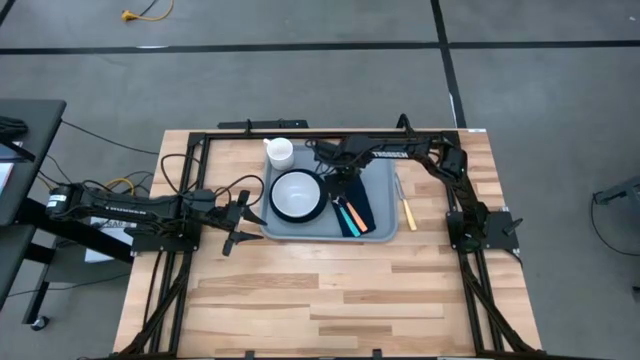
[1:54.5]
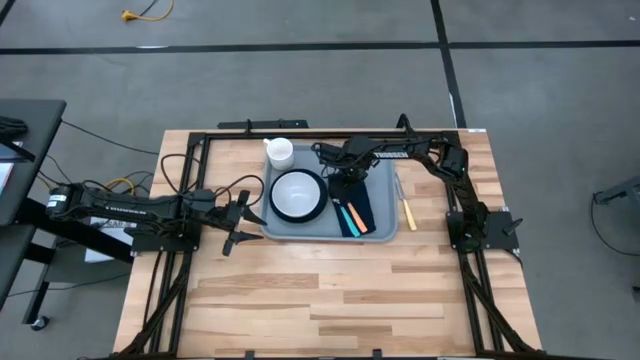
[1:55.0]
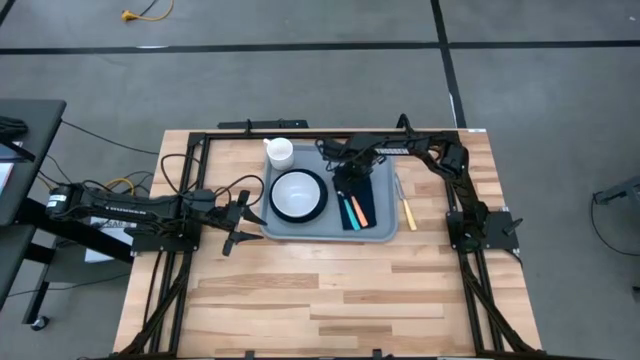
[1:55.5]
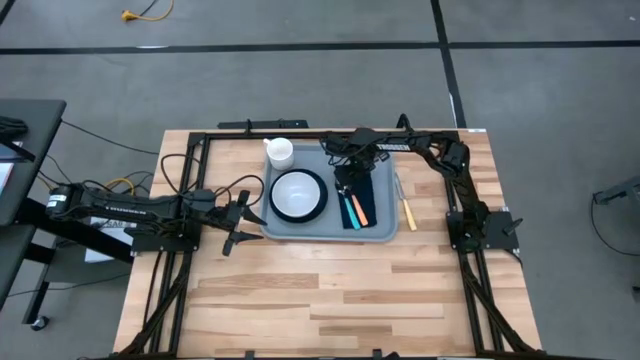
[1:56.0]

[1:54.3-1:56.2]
Task: Set up tray
Adjust the blue napkin on the gray tray

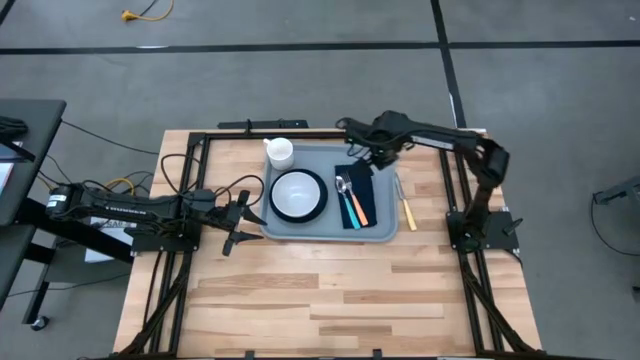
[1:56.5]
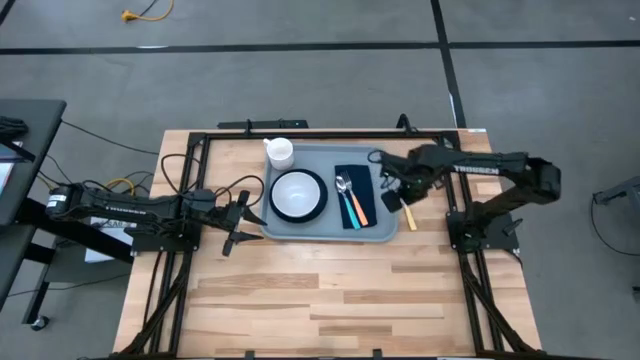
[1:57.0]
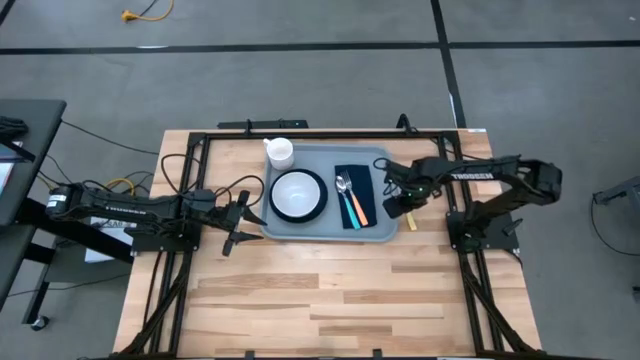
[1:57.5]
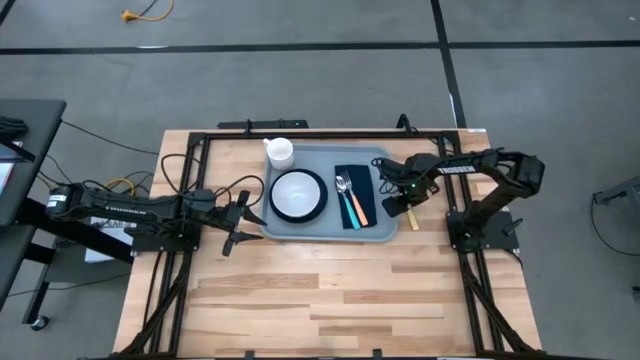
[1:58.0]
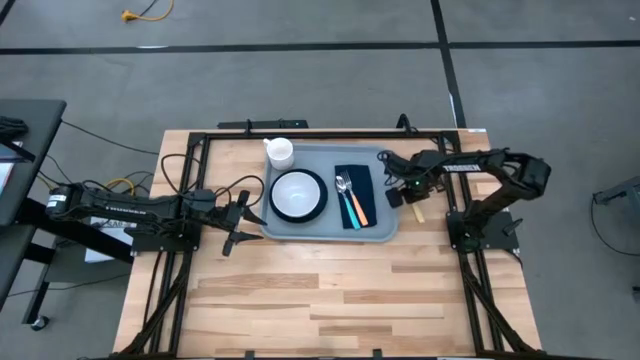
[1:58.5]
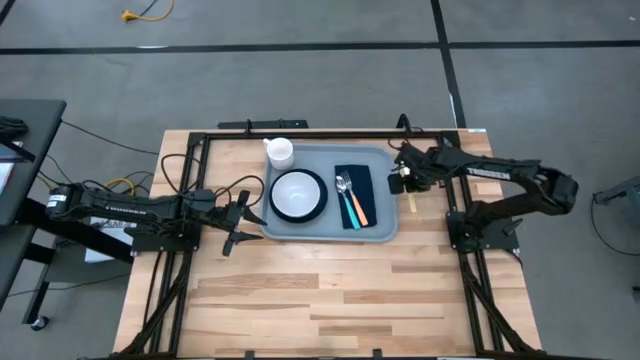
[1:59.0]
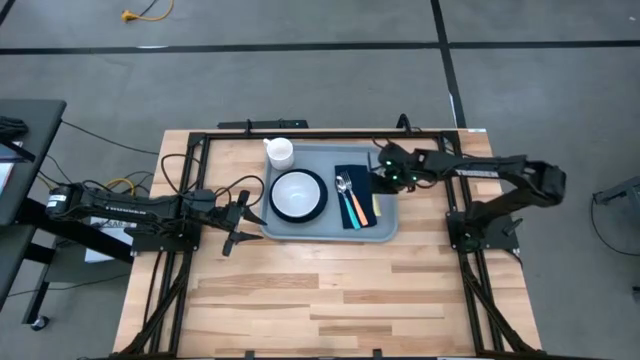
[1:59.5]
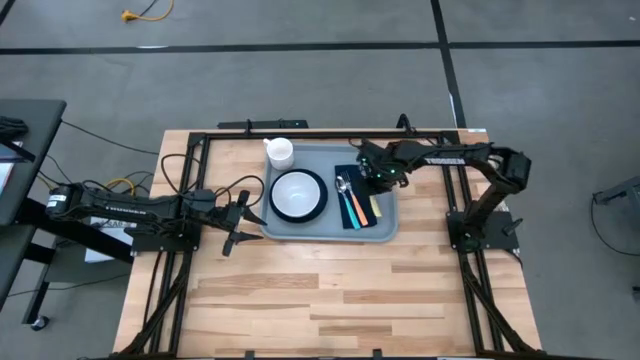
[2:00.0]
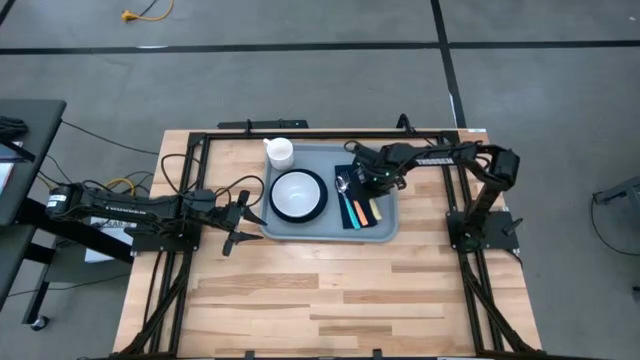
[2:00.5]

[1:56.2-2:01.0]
Put the yellow knife to the right of the orange fork on the blue napkin on the gray tray

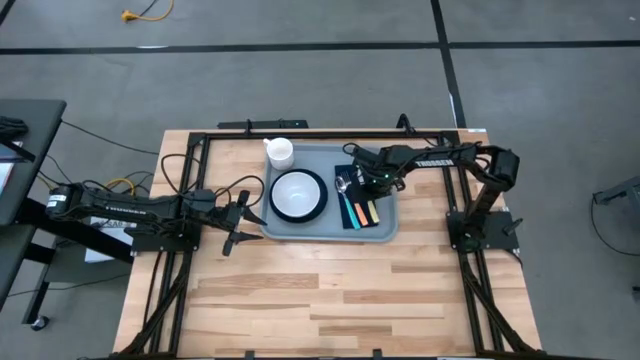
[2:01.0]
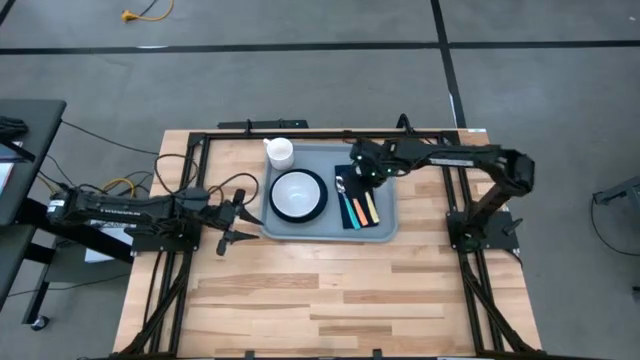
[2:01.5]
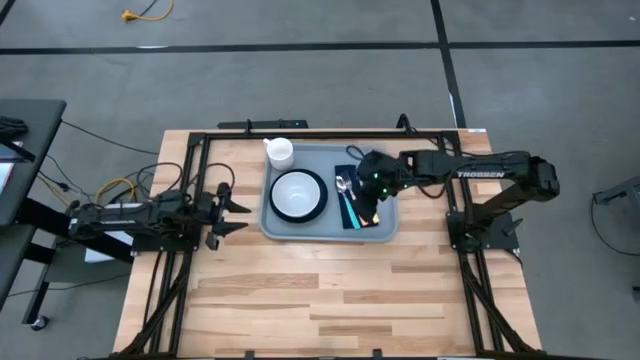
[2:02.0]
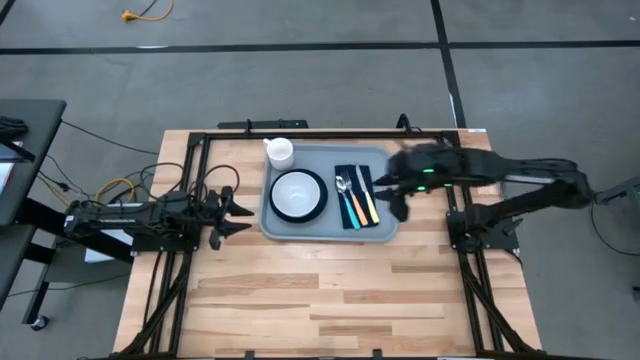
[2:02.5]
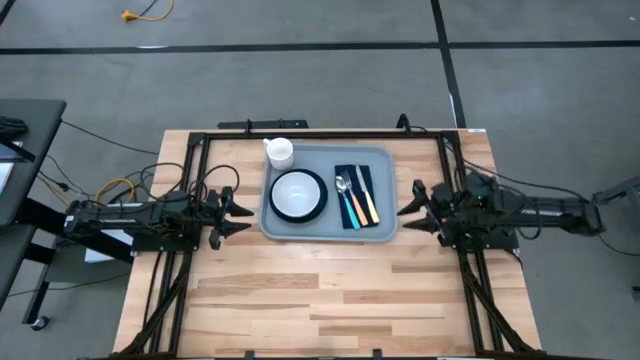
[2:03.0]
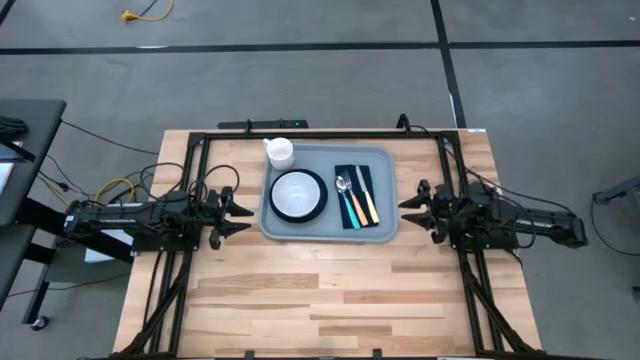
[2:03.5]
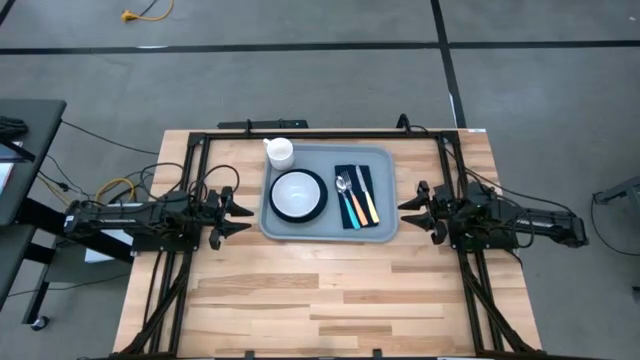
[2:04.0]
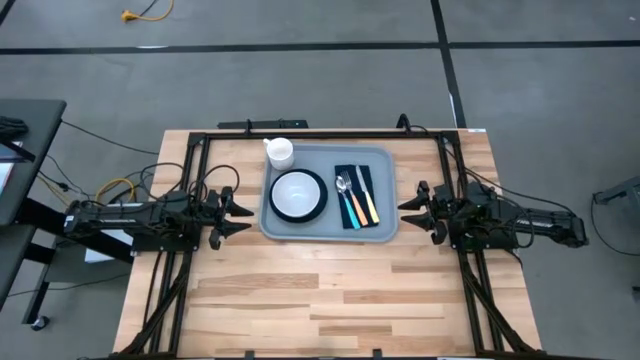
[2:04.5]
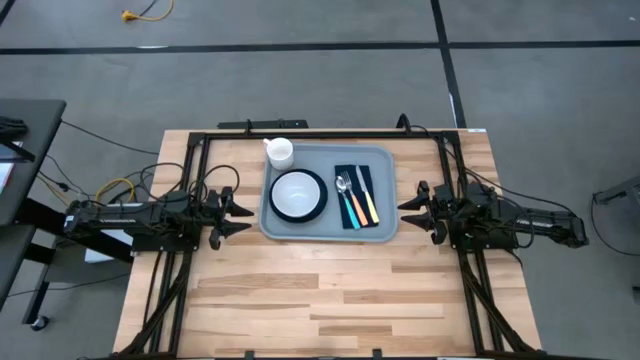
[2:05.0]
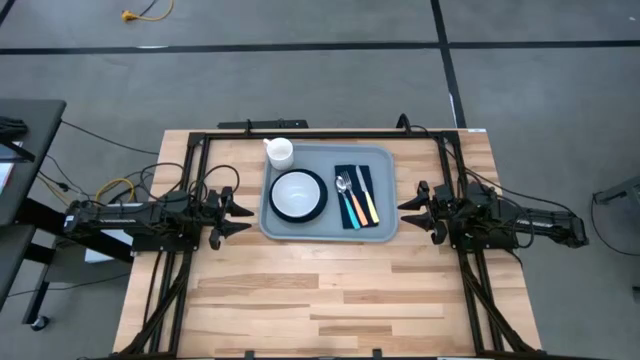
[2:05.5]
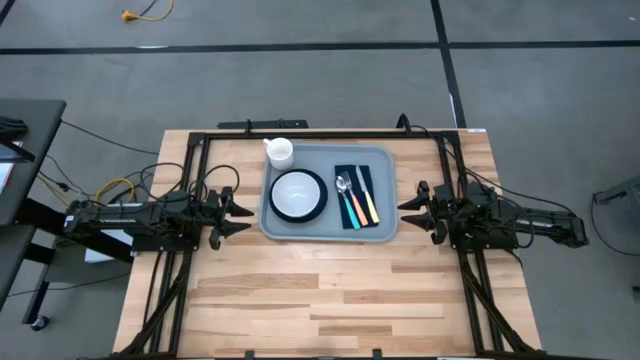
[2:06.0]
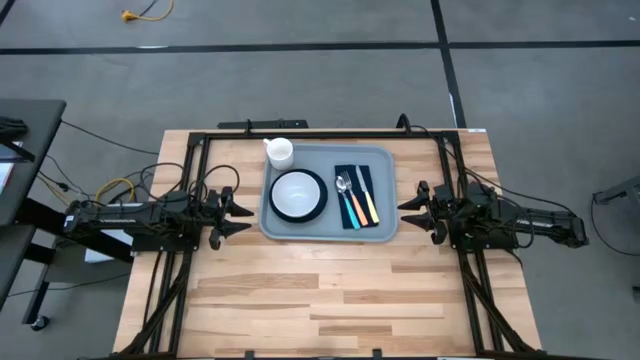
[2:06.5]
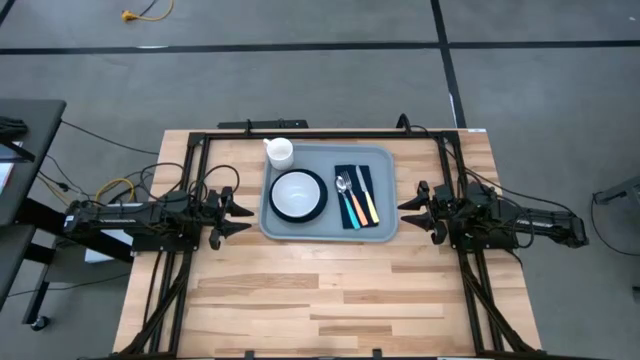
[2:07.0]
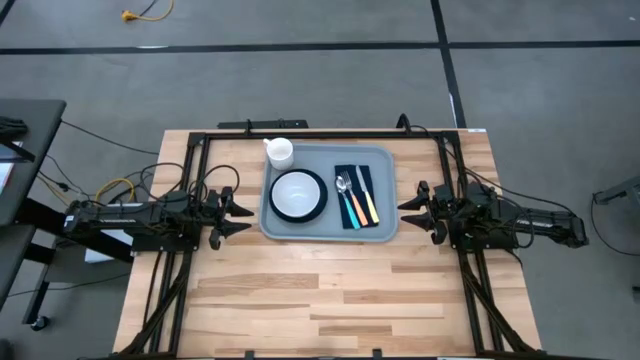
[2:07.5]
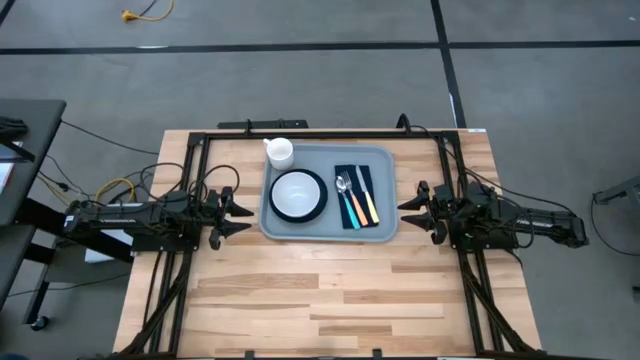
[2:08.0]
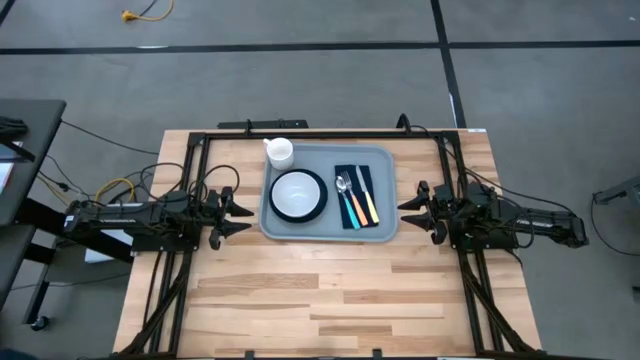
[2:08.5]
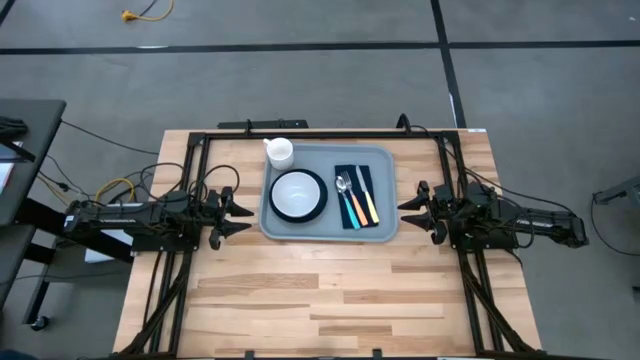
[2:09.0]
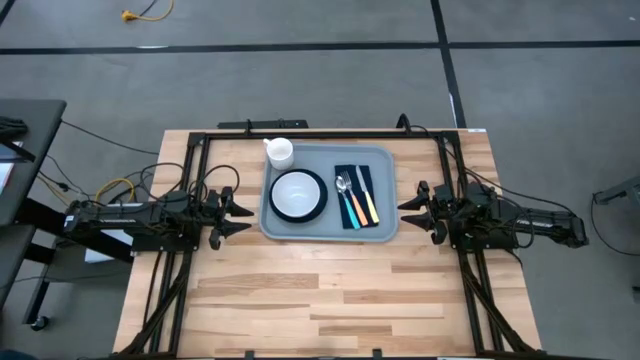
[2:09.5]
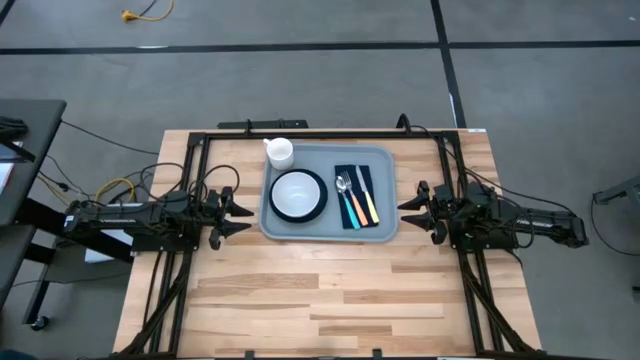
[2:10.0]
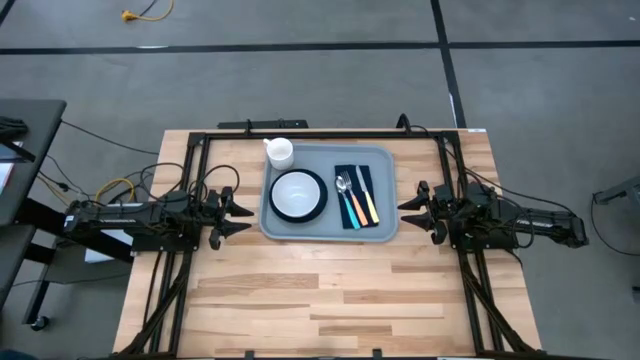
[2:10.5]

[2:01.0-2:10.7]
Return to Home Position

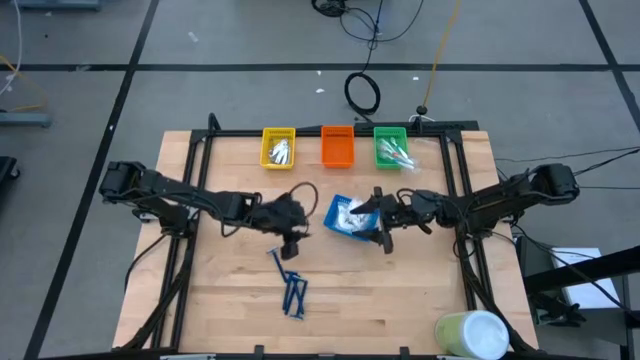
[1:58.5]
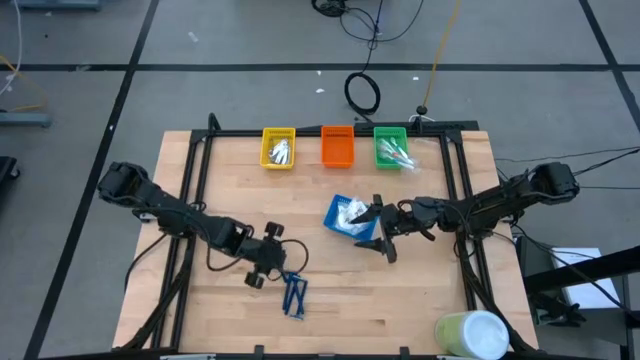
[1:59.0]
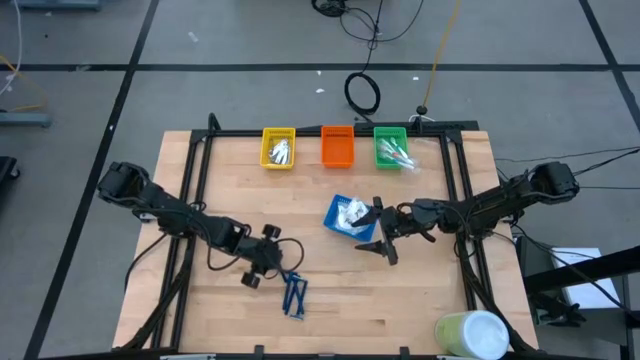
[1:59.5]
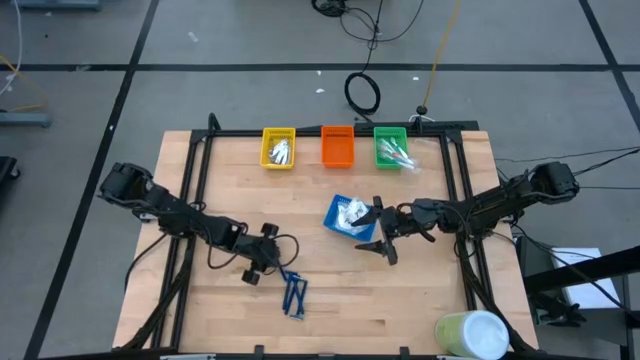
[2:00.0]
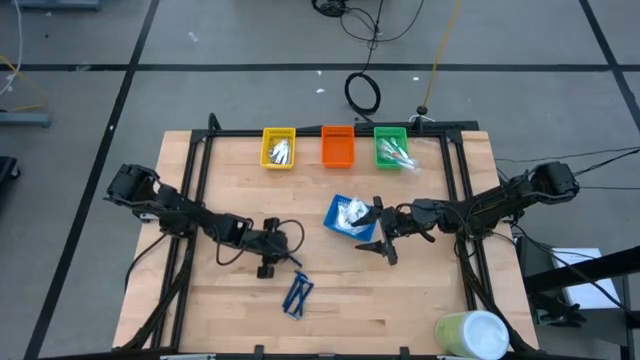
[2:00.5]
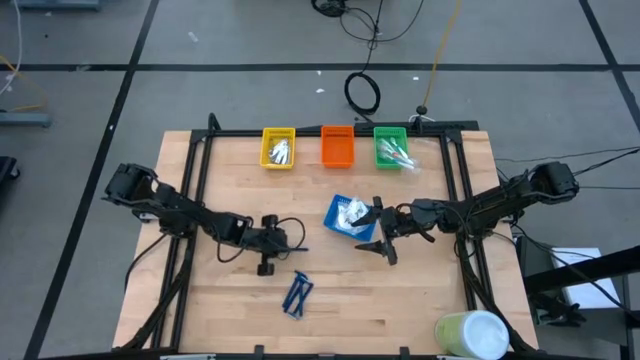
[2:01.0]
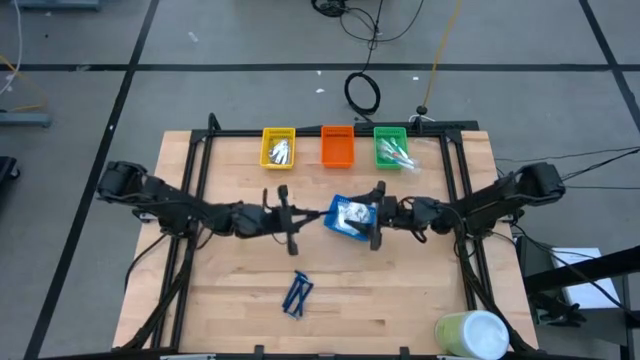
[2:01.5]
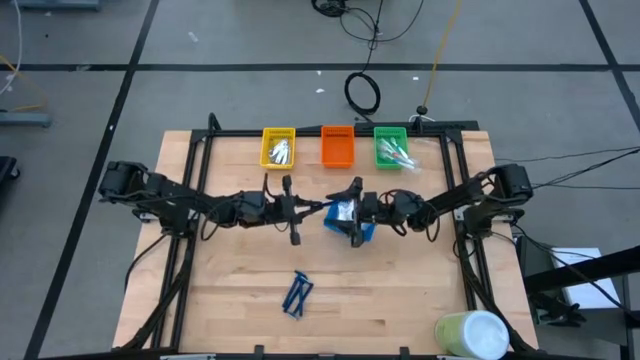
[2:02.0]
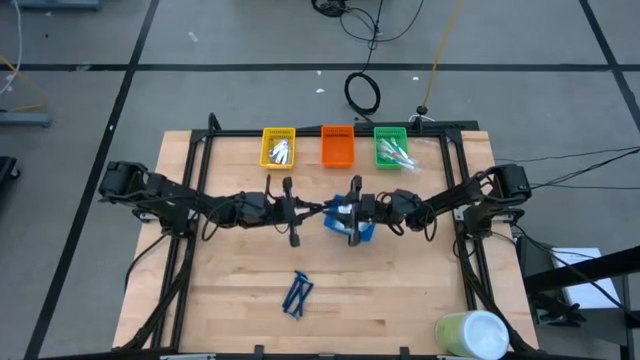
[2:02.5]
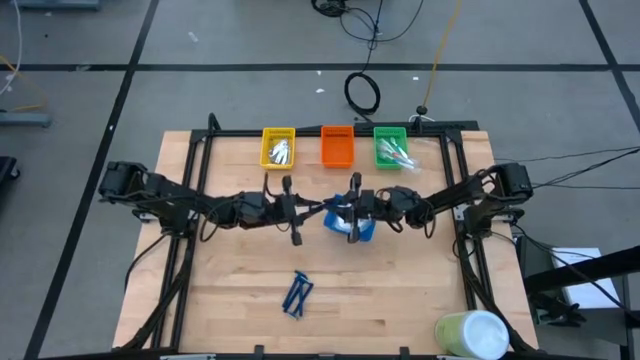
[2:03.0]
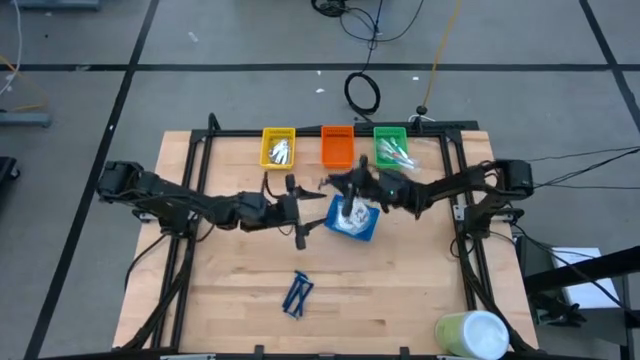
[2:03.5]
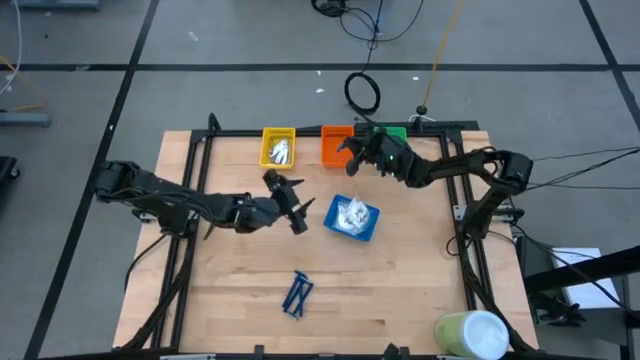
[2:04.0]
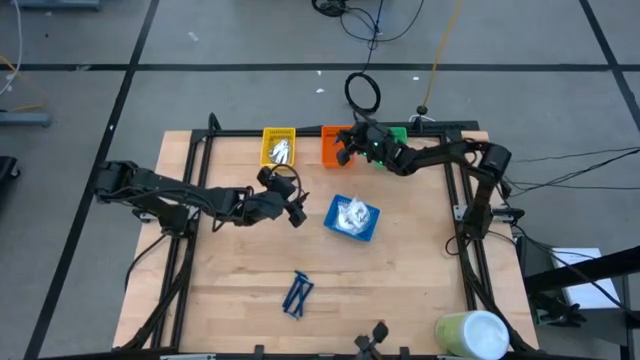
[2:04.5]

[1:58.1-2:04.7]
Task: Pick & Place Travel size toiletries
Put the blue razor into the orange basket
